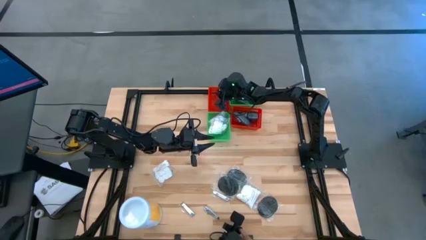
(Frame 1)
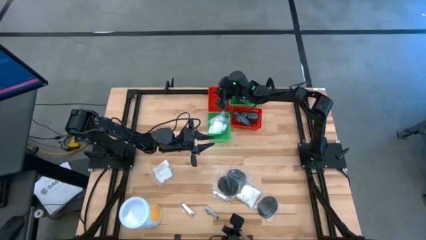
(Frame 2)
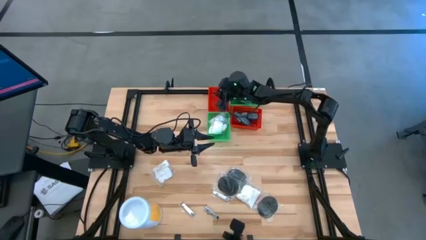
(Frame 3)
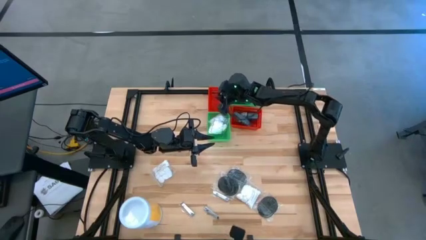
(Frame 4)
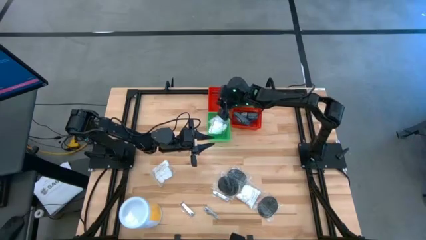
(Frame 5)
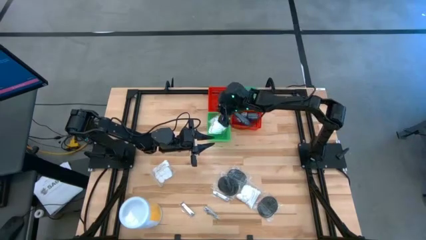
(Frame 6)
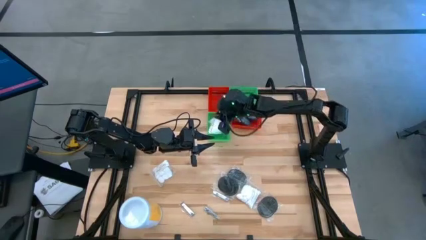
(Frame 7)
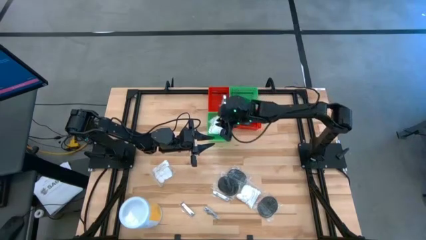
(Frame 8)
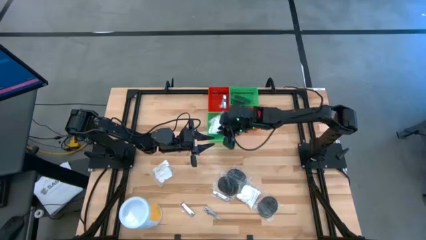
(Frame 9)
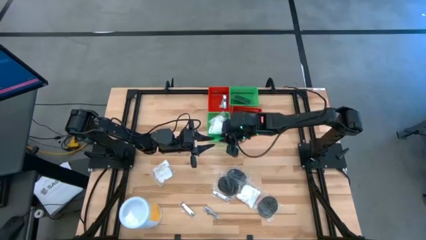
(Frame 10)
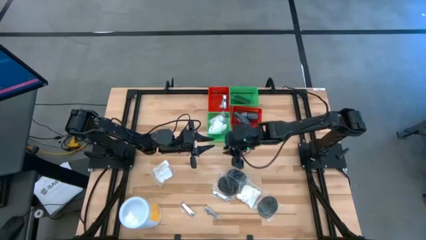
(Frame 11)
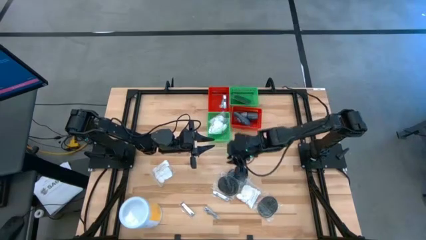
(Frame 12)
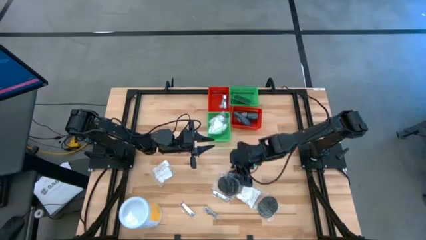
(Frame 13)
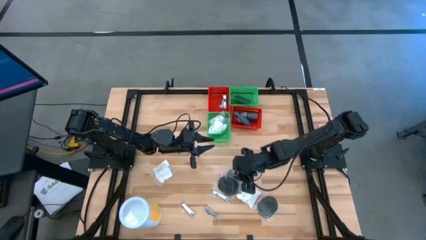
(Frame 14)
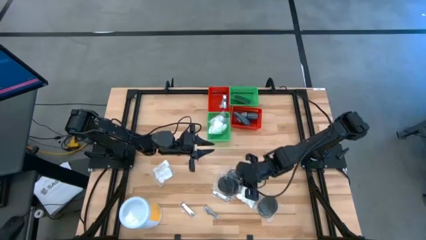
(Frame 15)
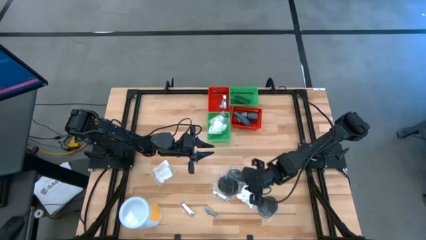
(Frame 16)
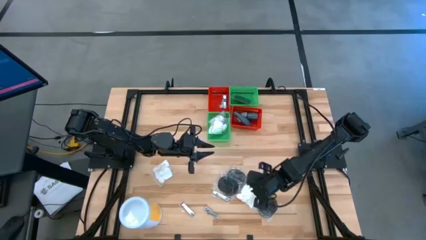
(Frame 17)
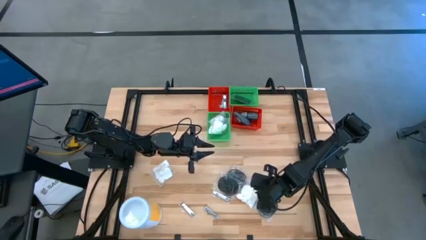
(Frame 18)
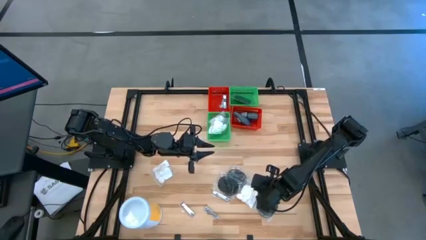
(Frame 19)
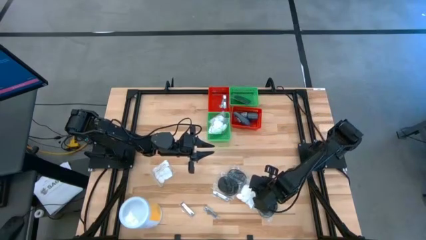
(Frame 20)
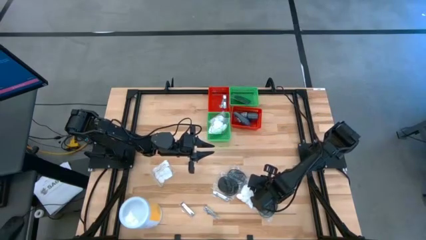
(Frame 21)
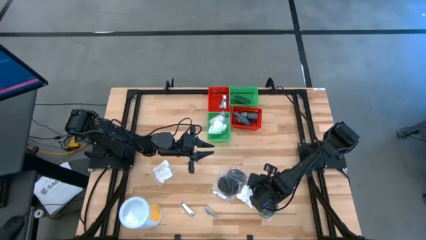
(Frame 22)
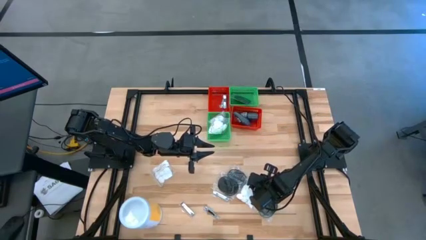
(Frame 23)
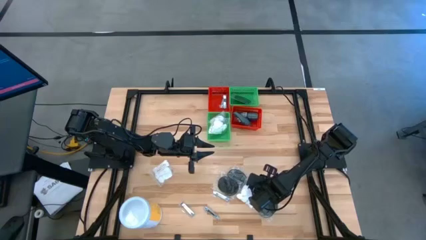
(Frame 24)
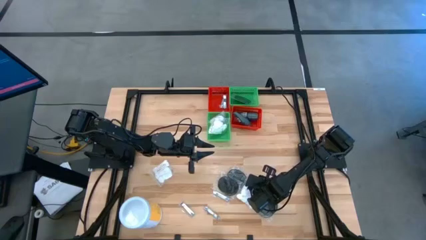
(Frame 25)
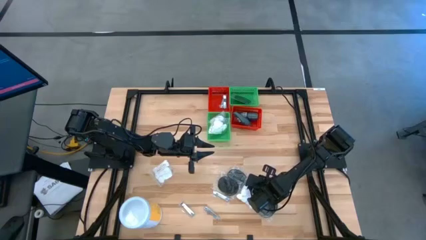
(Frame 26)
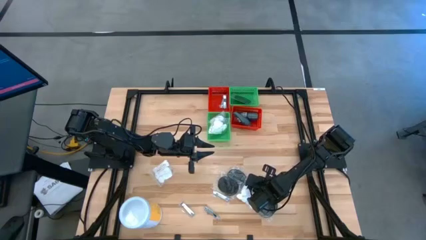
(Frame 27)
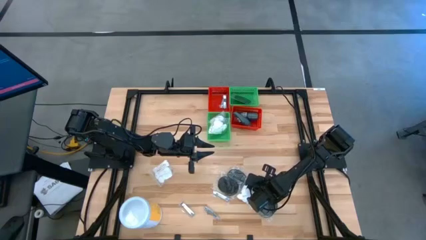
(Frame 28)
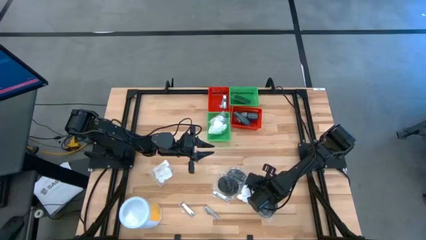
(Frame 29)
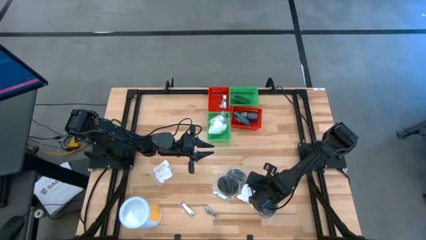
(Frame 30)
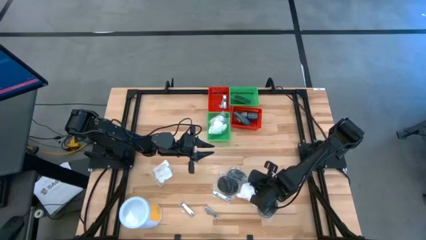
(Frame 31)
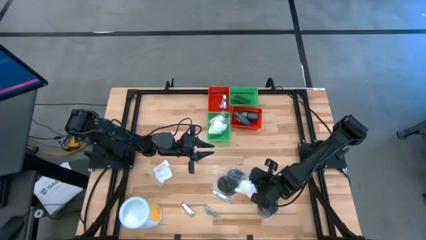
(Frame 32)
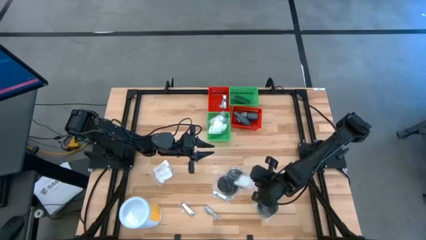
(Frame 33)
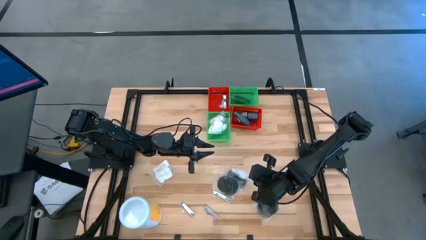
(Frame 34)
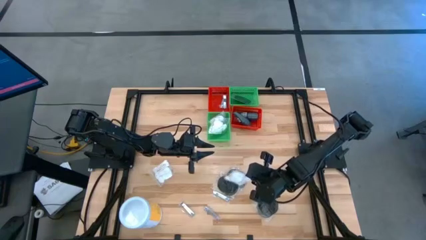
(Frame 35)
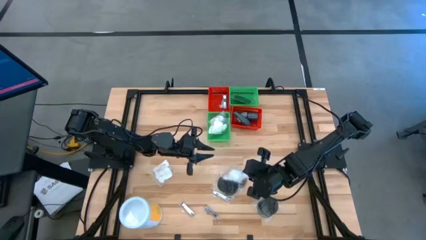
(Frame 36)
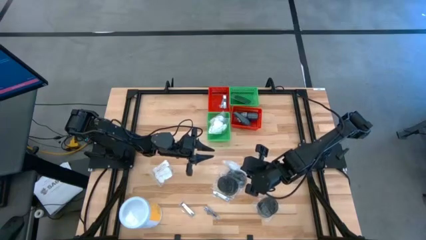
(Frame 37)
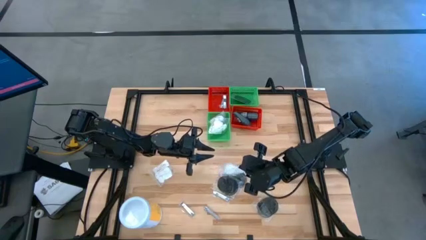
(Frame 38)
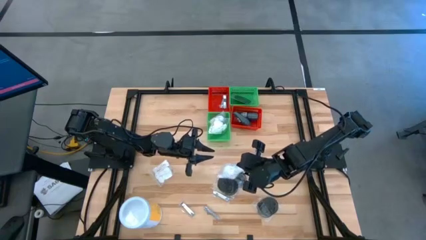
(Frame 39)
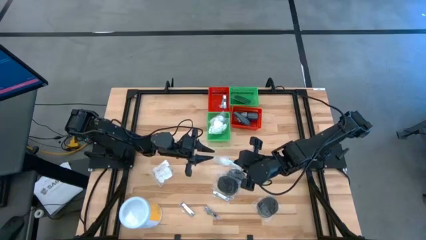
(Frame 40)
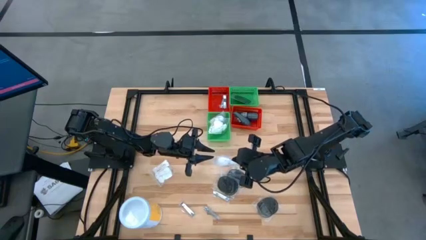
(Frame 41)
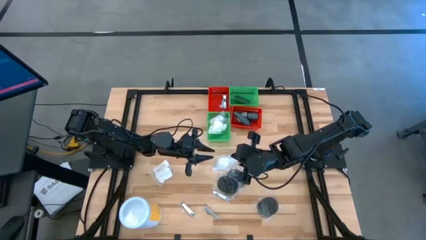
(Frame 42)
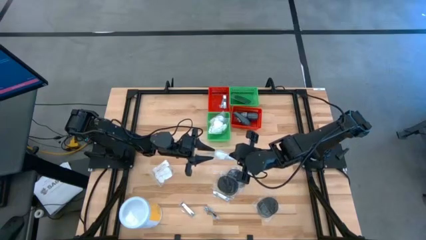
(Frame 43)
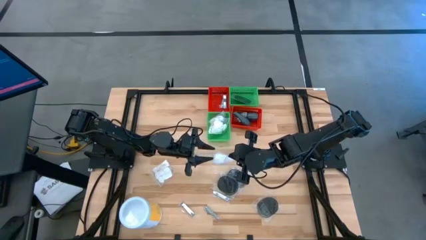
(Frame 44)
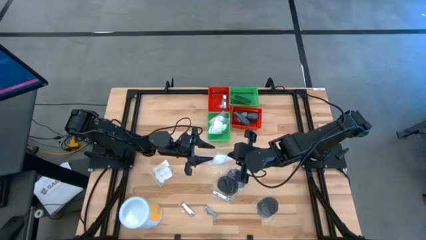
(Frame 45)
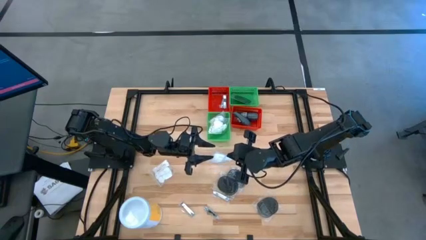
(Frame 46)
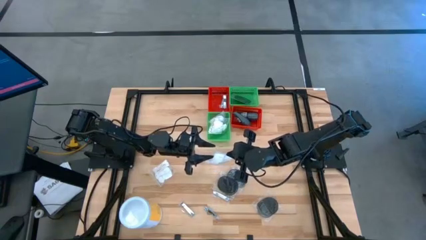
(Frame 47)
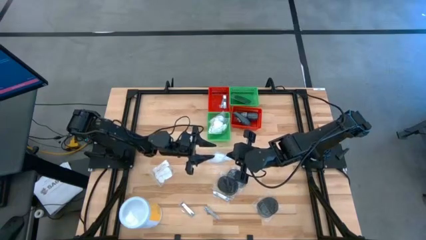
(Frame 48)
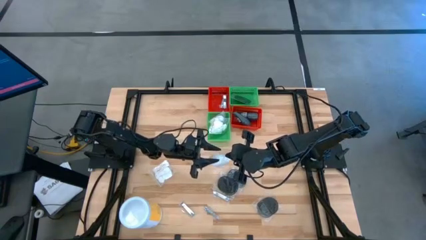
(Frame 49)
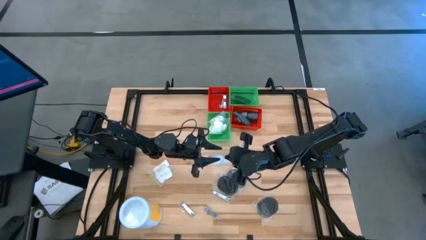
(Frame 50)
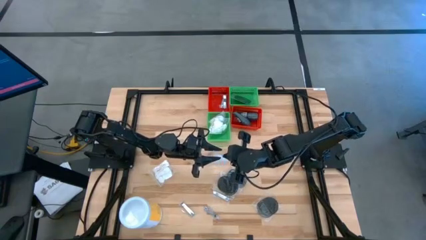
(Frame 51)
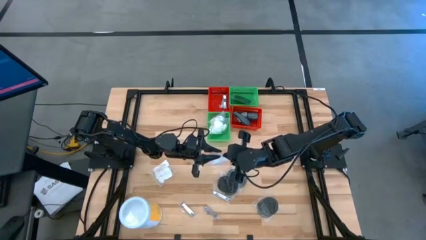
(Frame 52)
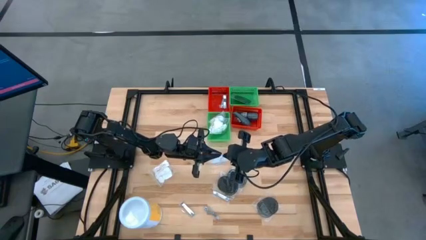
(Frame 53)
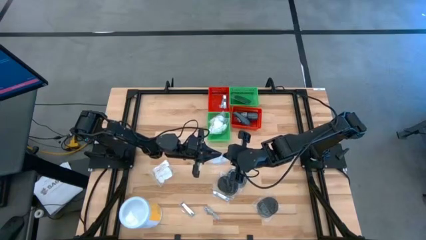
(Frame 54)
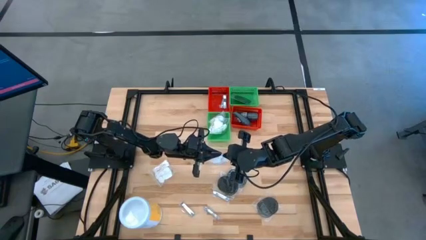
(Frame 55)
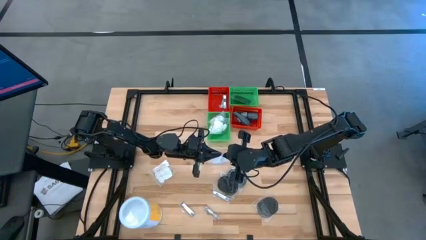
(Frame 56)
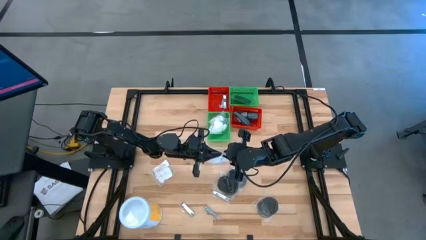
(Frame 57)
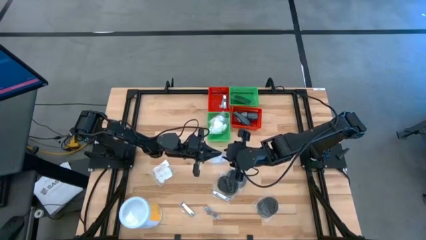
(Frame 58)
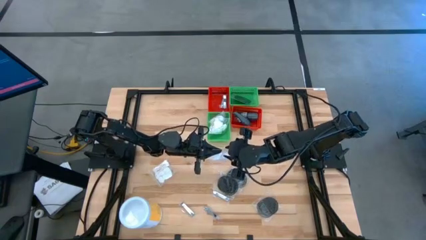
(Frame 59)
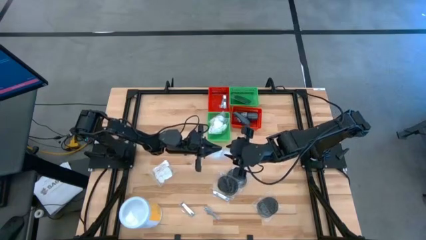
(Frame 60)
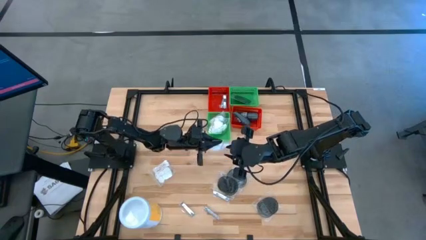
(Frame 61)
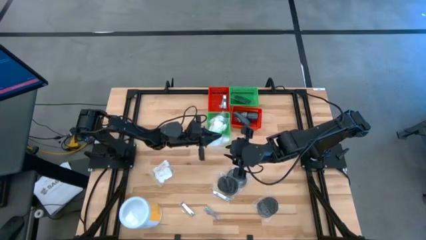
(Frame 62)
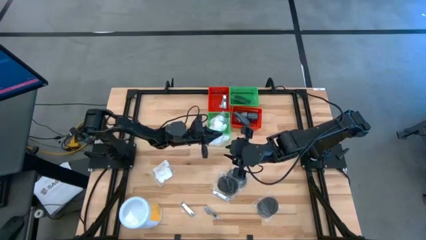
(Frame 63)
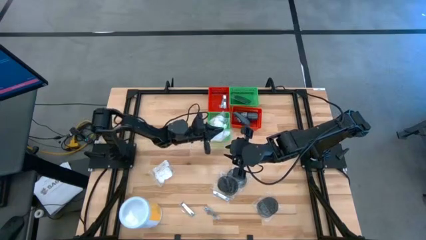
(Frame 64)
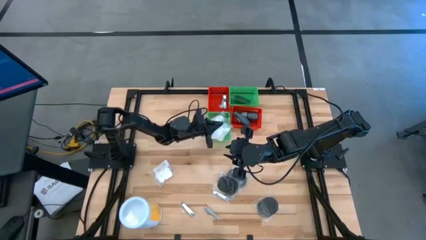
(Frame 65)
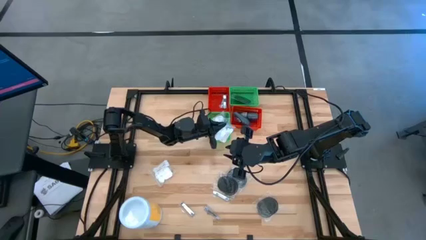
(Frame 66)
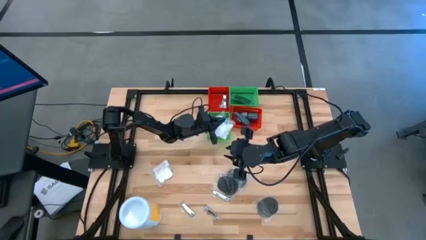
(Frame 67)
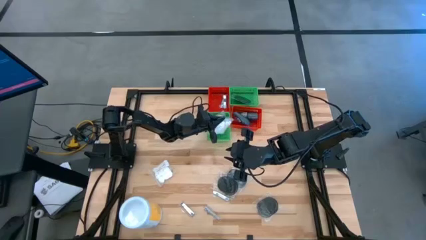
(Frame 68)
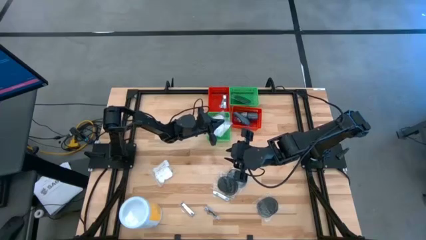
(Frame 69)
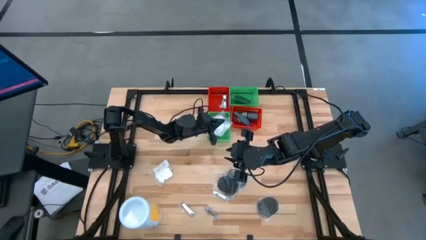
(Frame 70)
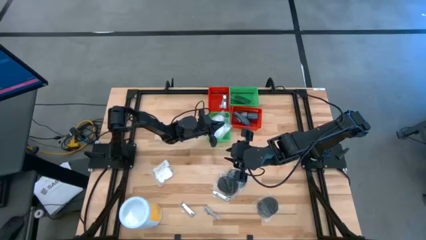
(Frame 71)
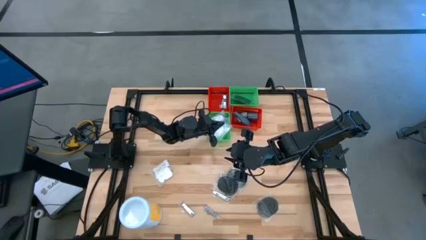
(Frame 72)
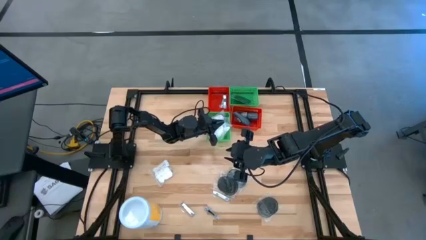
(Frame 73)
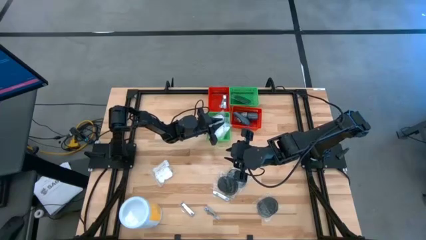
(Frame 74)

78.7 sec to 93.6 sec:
Task: Pick & Place Travel size toiletries
Put the white cotton pack into the left green bin
